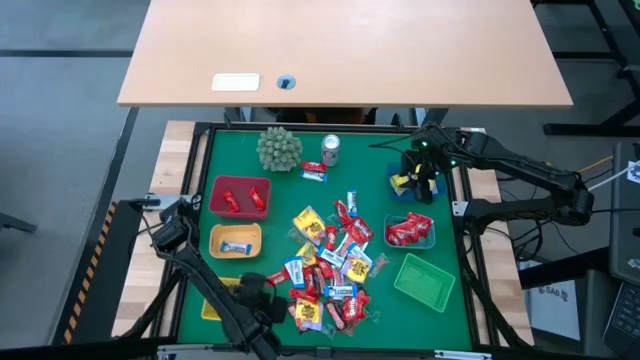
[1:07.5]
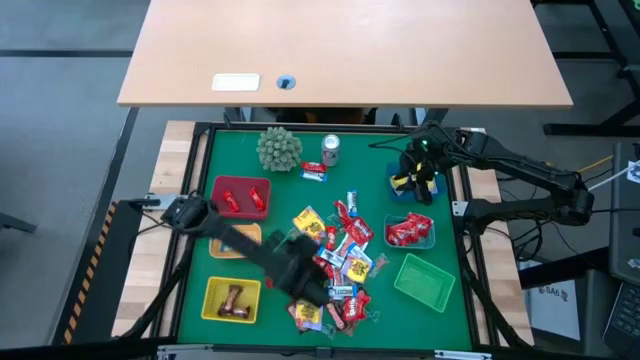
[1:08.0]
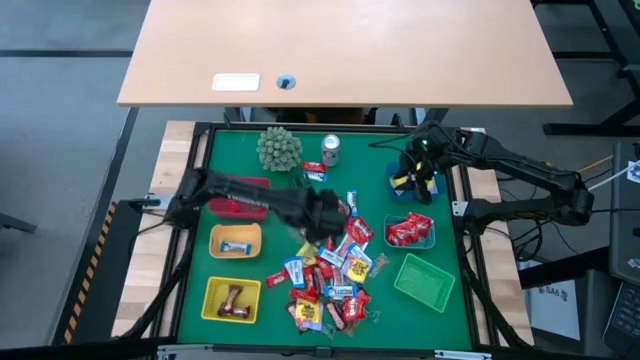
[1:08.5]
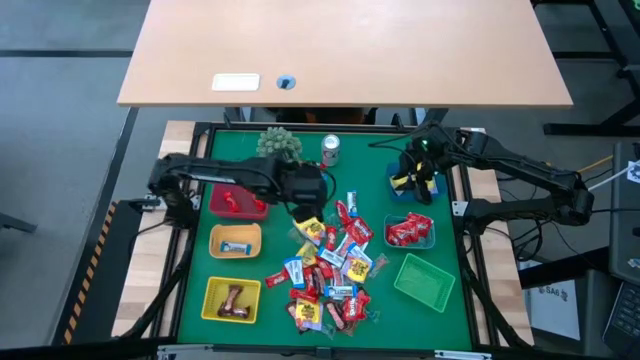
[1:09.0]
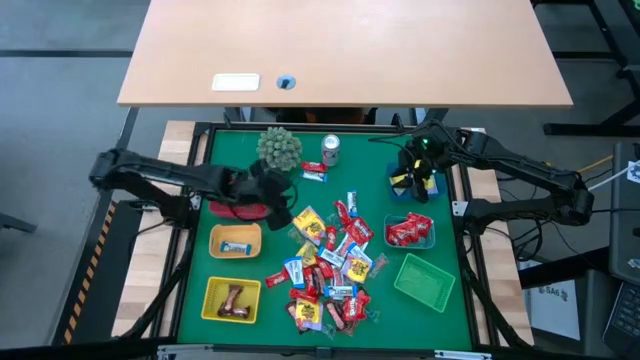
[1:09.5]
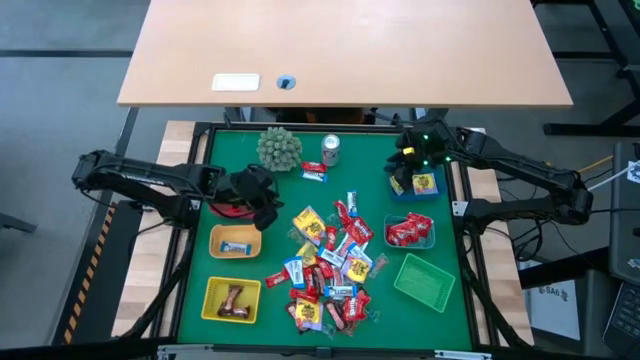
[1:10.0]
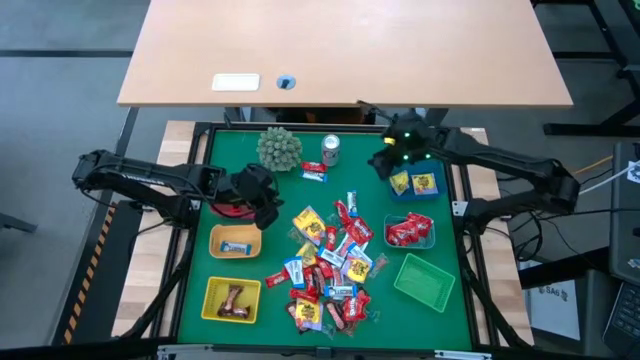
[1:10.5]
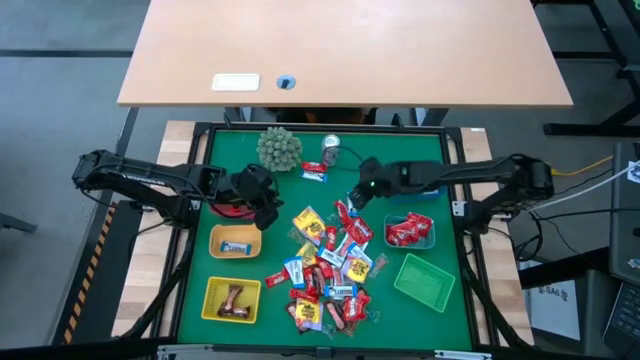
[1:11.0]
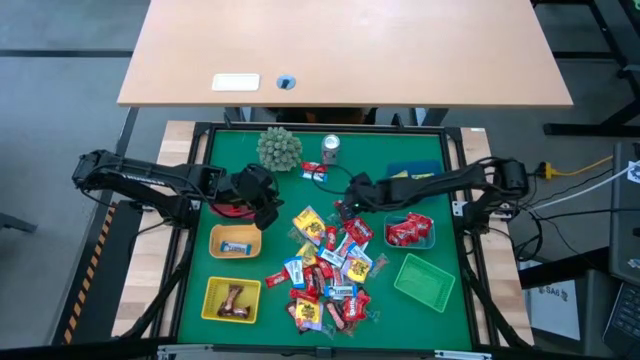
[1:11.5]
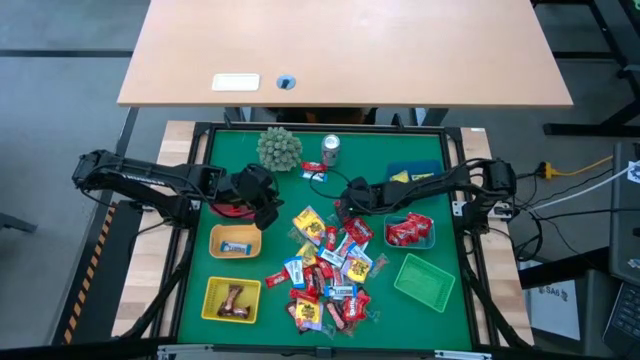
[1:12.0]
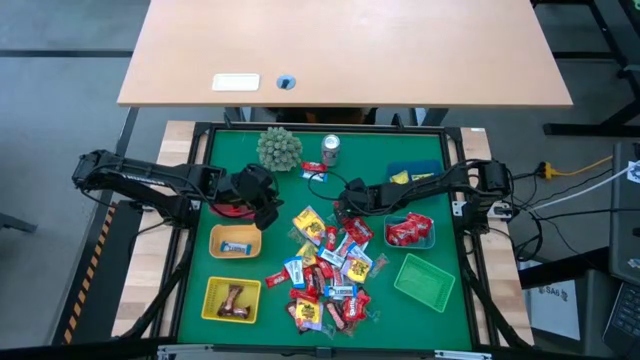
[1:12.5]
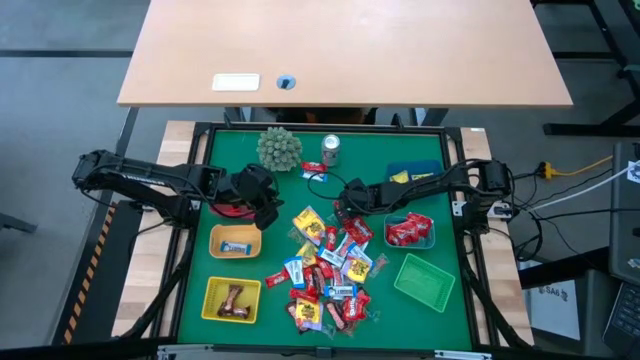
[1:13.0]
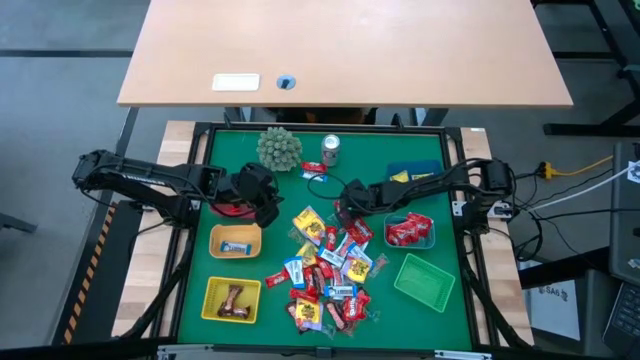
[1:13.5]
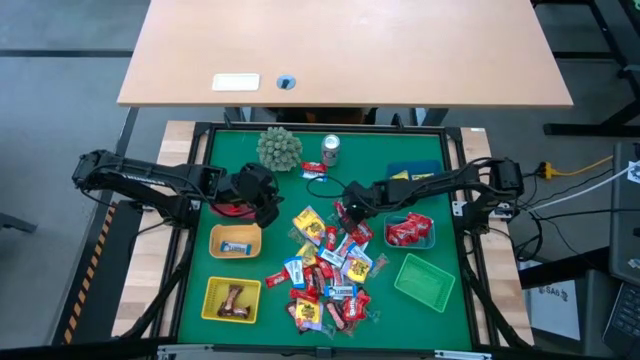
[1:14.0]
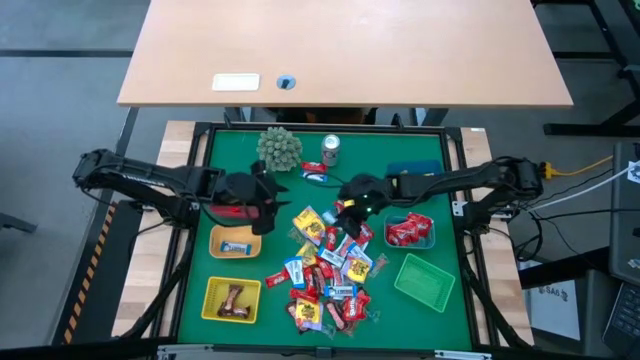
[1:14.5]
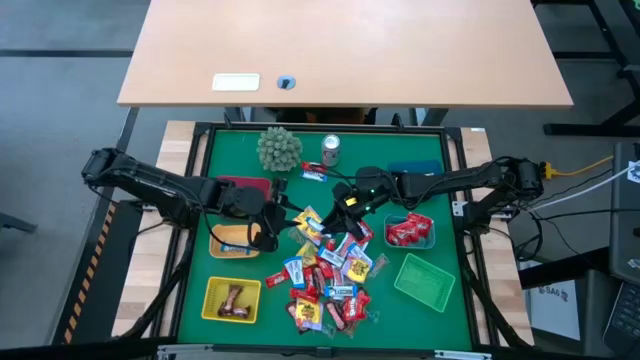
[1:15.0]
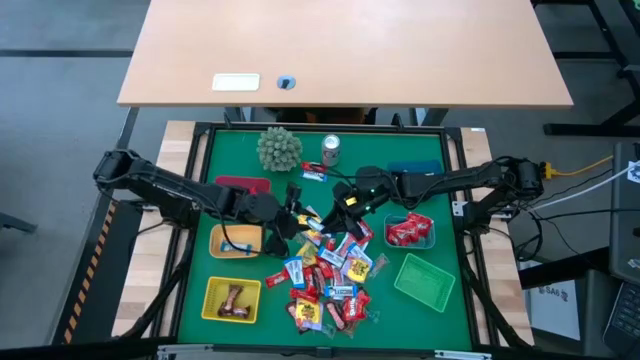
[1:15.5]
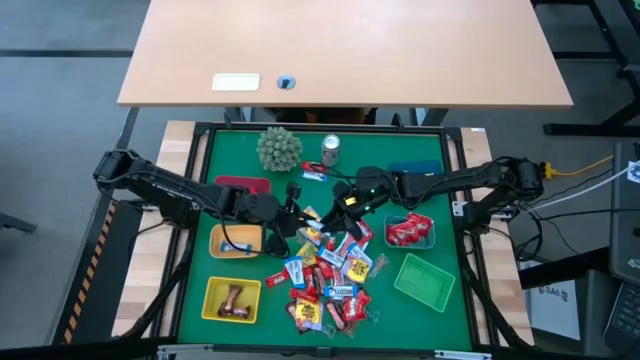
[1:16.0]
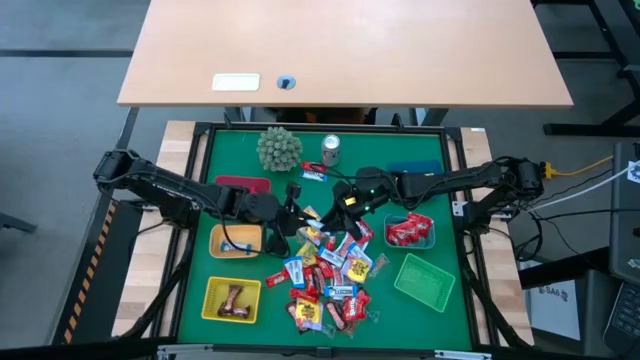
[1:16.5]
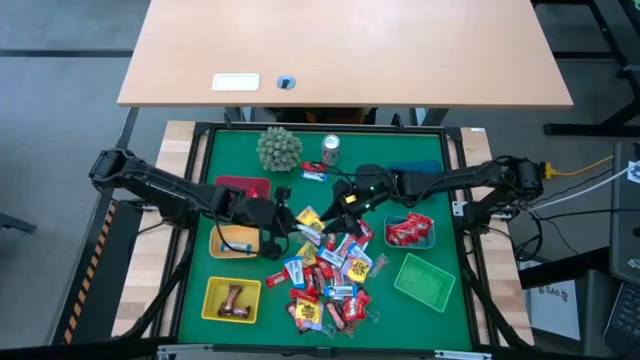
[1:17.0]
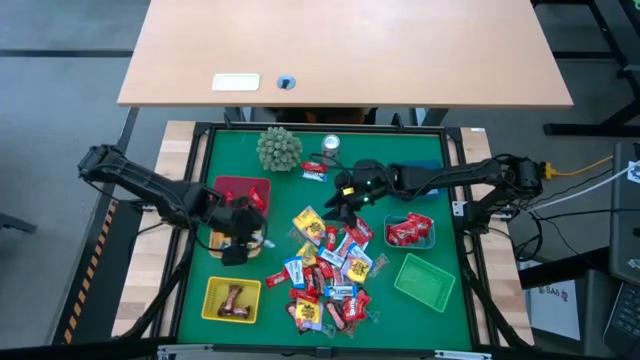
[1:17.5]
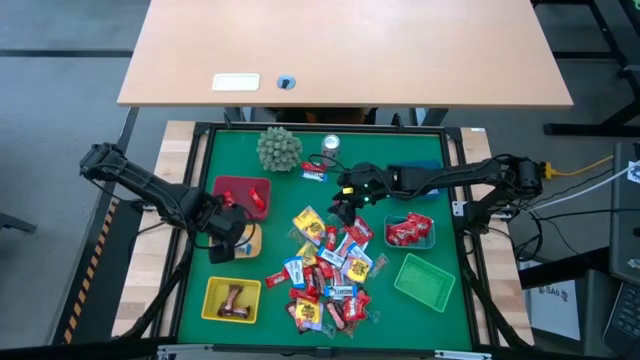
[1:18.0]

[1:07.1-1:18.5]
Task: Sort candy
Put the white chocolate bar into the orange bin

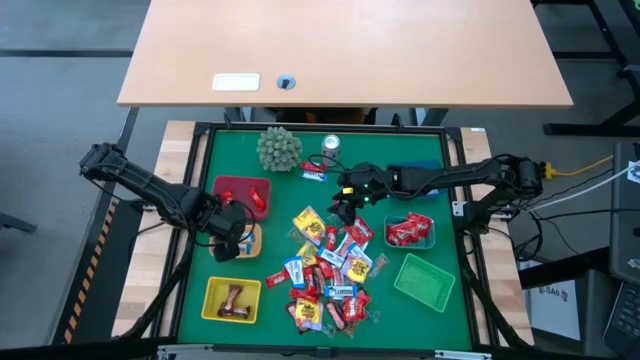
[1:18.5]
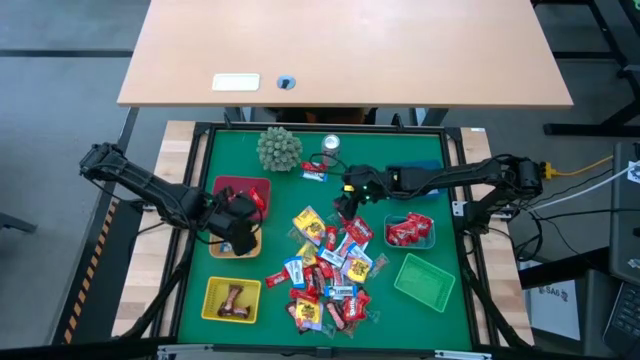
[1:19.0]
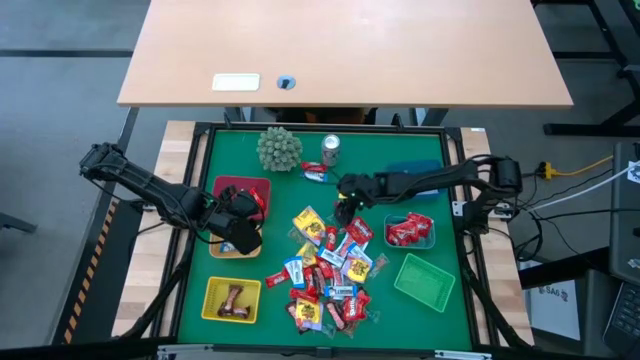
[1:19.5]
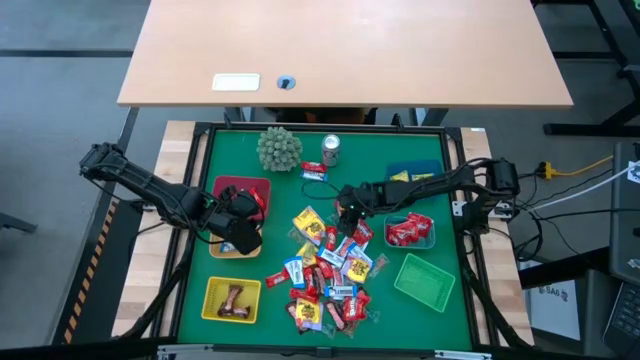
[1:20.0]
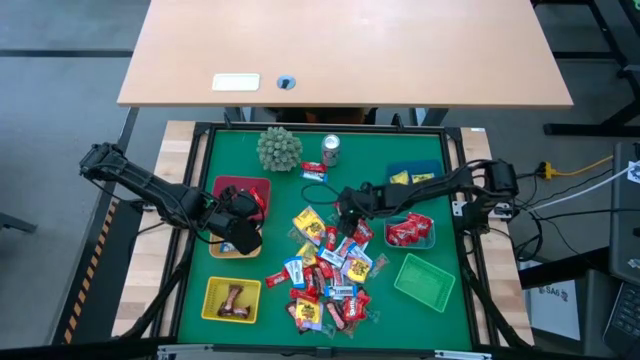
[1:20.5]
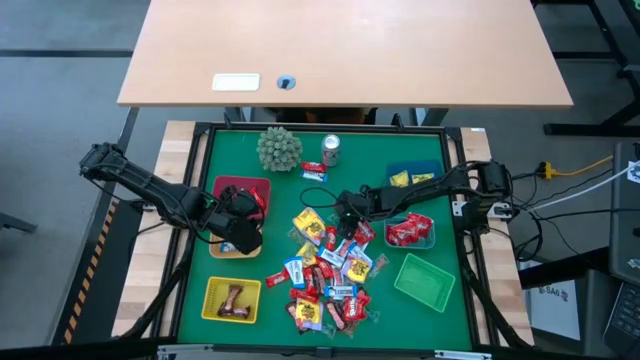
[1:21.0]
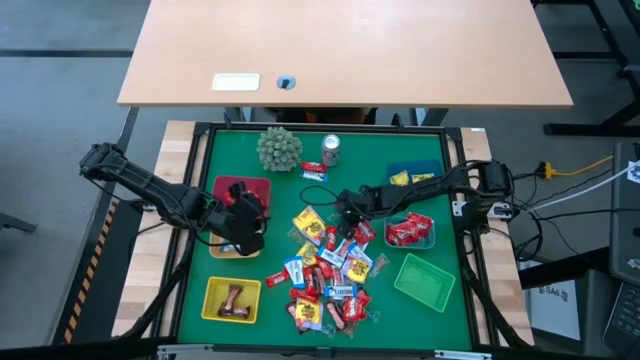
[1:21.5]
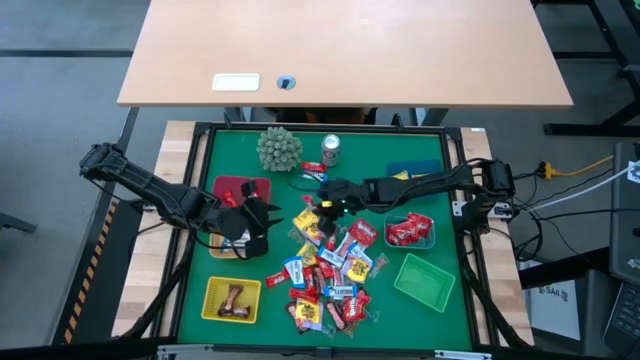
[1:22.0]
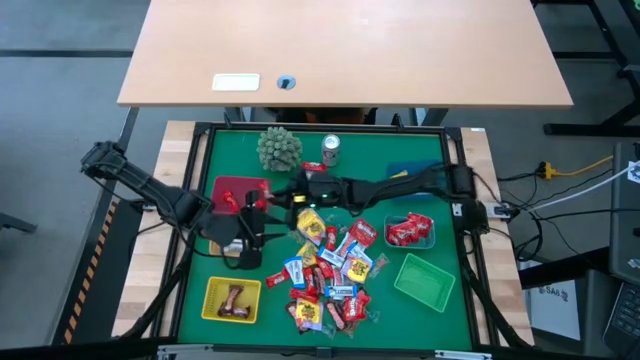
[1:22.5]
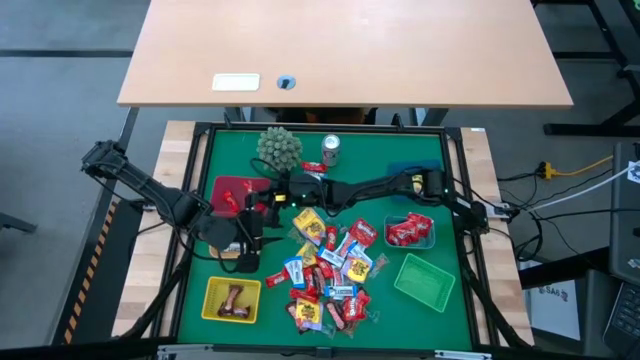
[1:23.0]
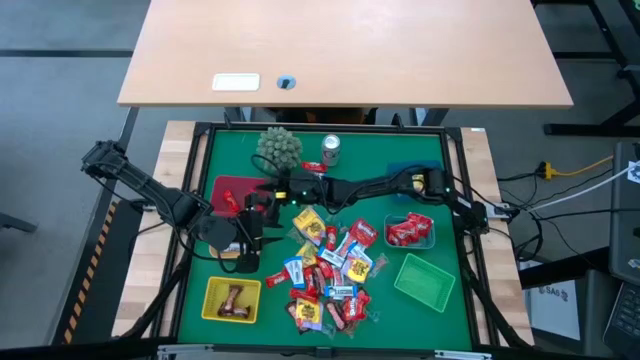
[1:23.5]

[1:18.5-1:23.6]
Put the red chocolate bar into the red bin
